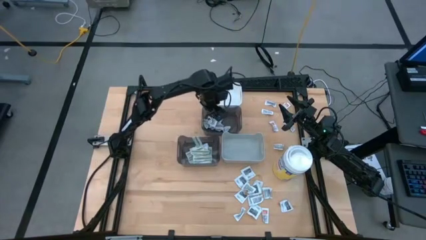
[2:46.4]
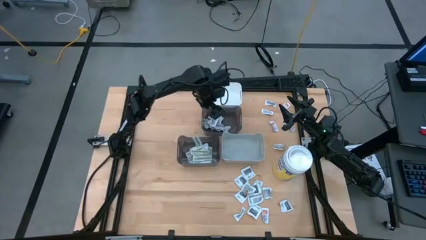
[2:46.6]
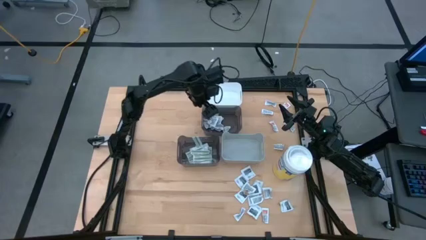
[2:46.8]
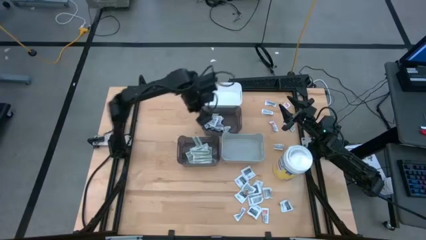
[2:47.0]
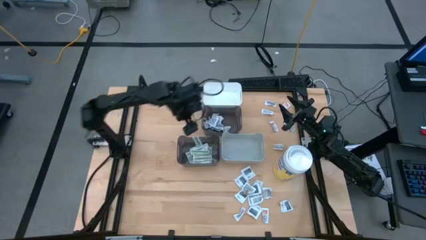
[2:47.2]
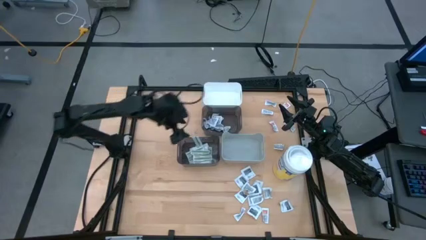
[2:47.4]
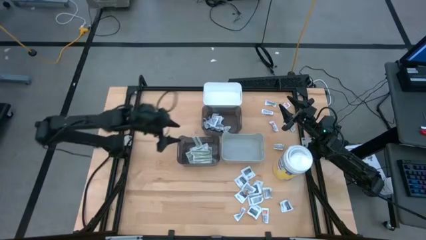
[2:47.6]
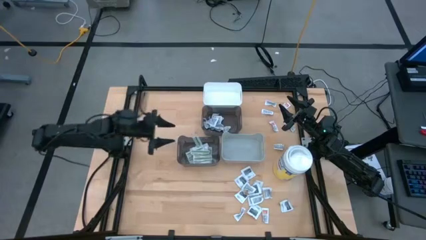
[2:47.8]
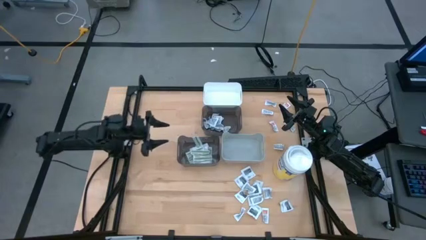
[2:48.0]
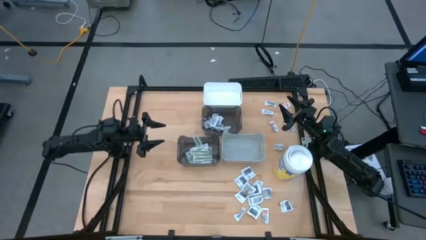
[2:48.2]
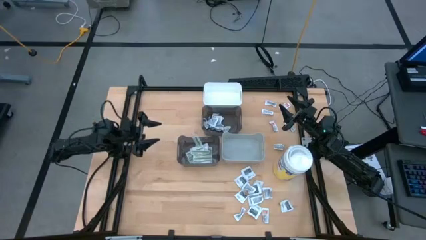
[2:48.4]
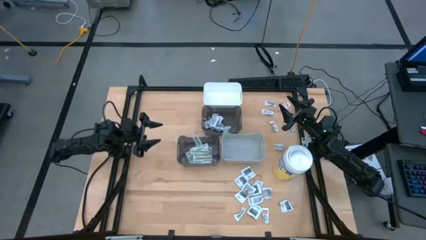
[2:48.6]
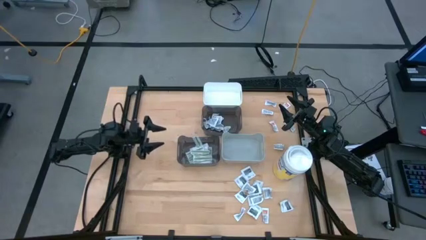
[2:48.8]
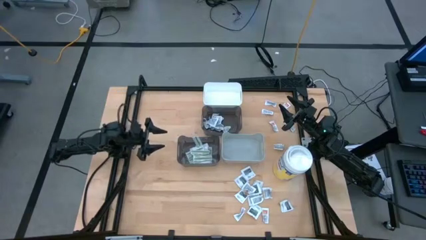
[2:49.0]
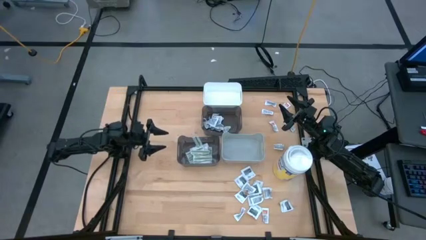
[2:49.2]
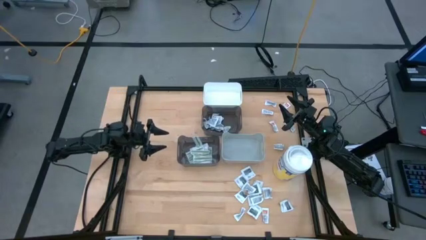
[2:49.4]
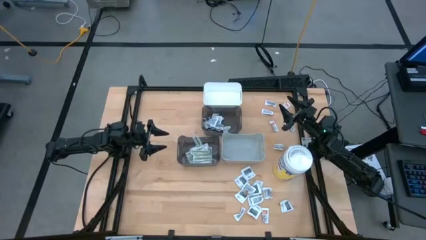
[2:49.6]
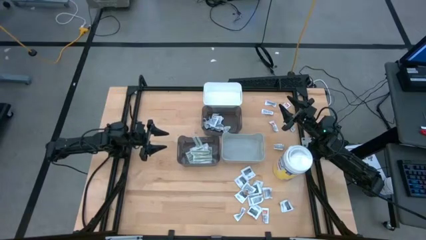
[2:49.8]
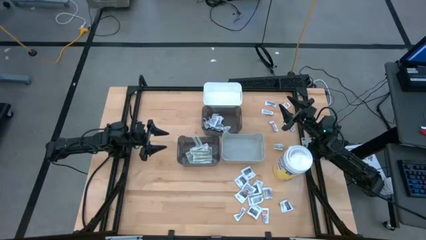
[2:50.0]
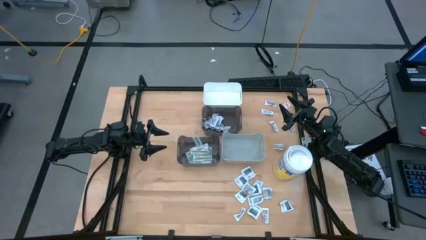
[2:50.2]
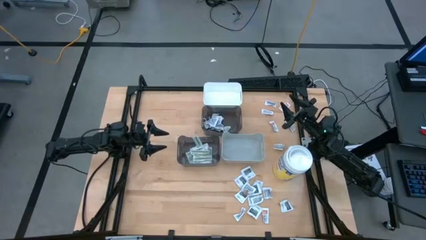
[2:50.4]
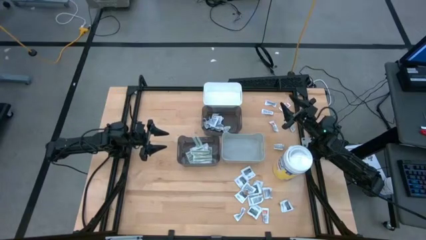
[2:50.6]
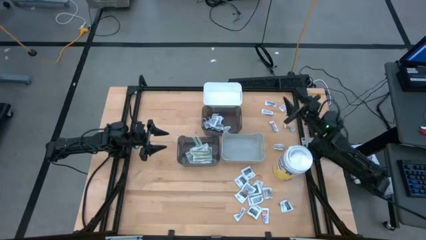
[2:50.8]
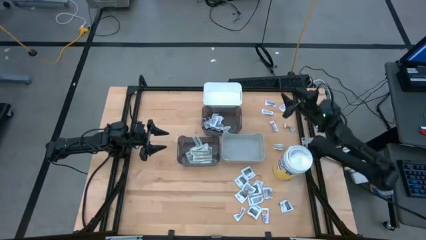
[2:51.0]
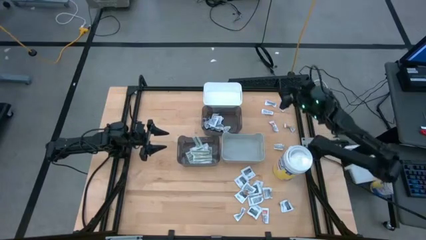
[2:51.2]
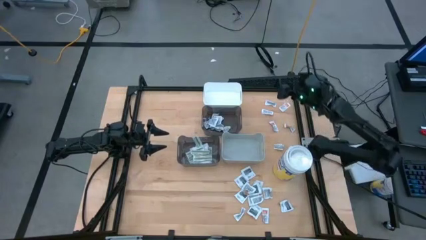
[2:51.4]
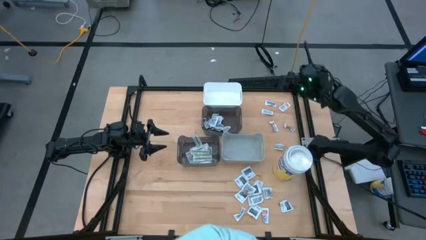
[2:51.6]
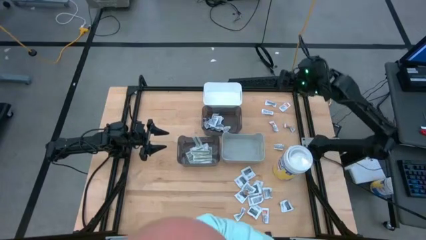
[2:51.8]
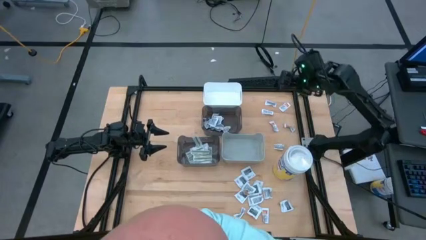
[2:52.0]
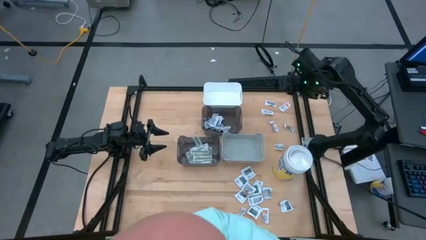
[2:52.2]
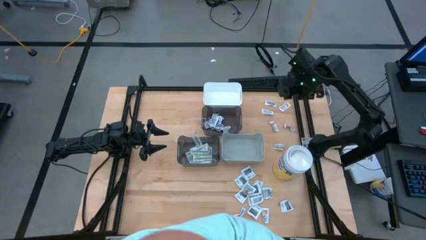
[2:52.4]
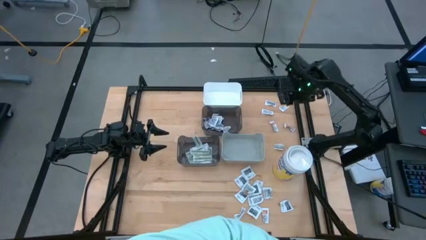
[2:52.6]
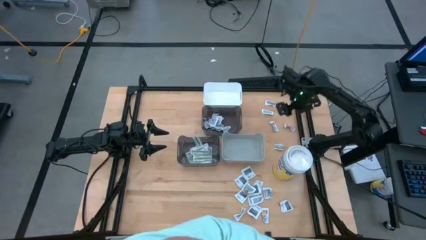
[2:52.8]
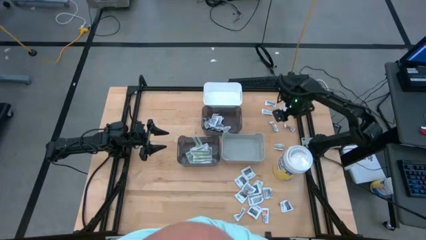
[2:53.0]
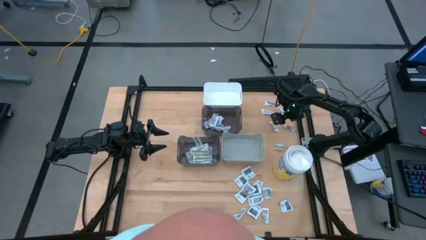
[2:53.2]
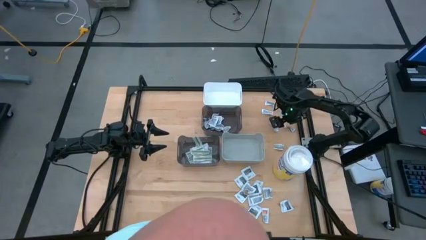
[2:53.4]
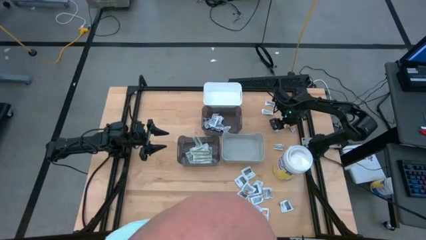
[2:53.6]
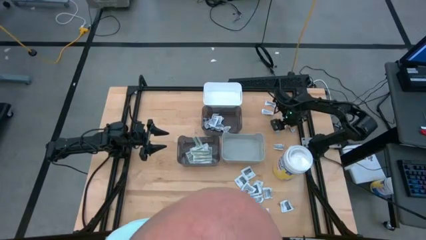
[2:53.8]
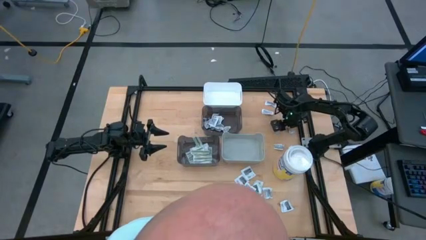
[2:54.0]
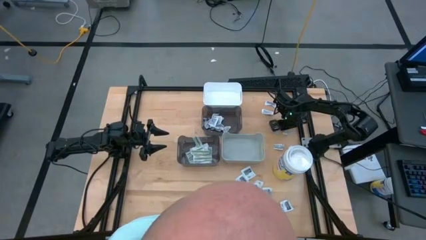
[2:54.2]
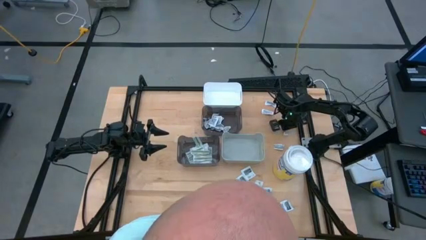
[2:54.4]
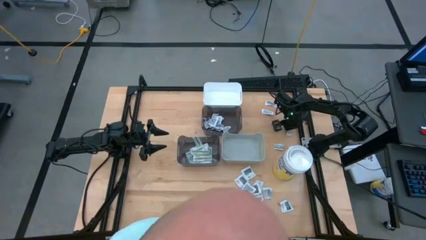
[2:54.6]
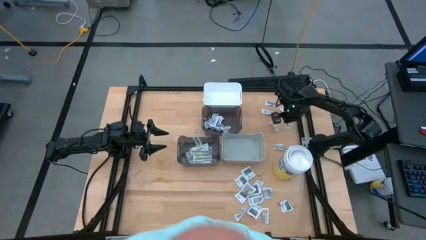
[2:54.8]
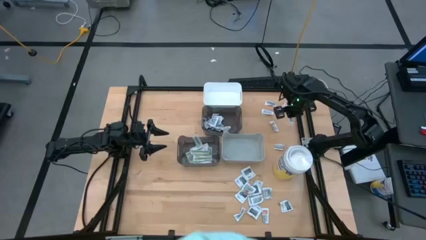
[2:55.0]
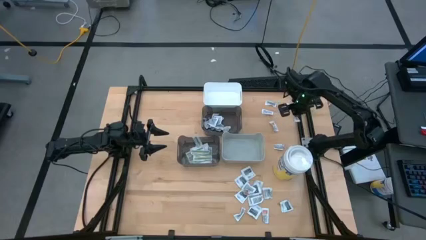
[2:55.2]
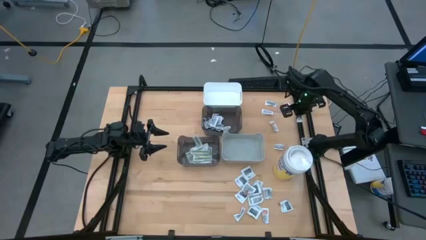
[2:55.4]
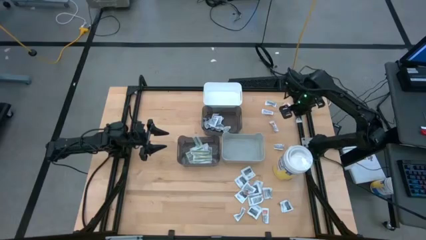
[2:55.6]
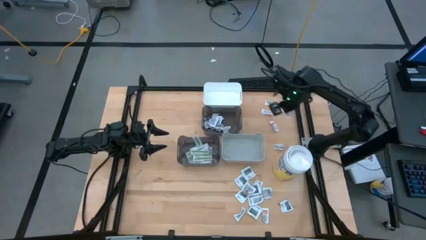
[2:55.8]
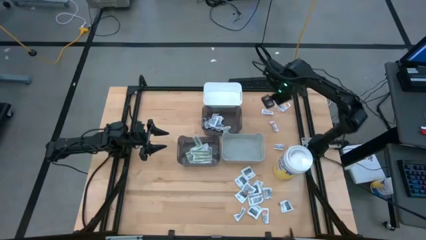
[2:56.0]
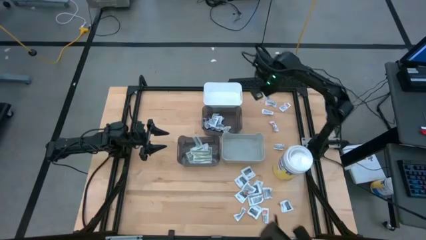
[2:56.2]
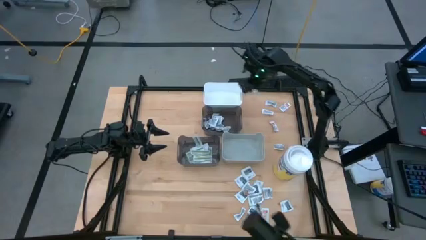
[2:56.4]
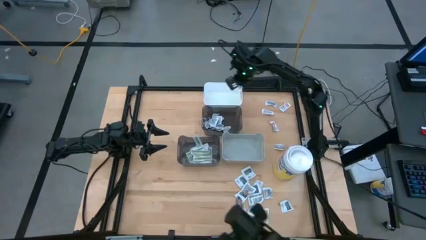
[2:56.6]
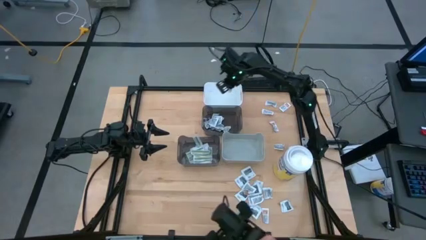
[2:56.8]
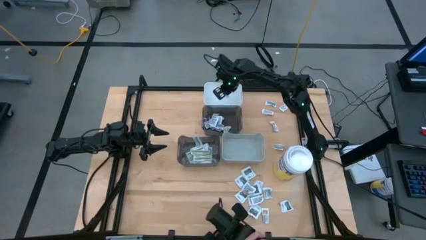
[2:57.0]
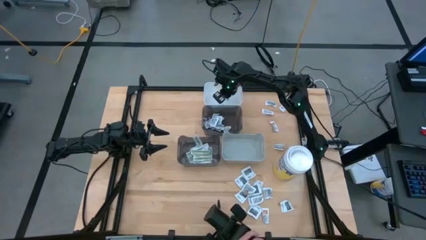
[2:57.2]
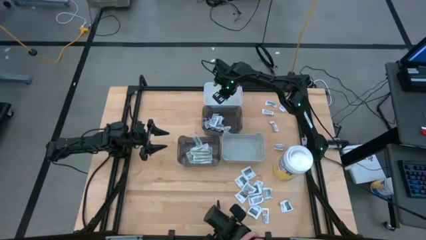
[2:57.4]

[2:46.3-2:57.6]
Task: Pick & Place First Aid Supplies
Put the white ointment pack into the white bin

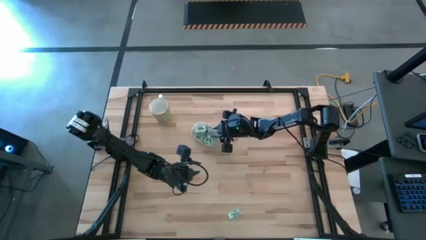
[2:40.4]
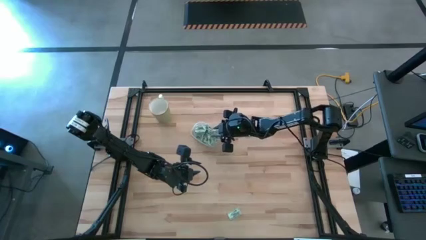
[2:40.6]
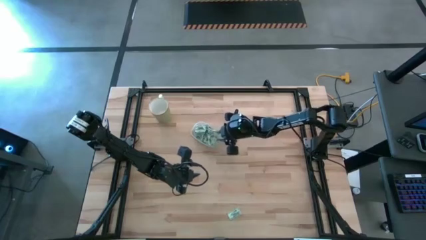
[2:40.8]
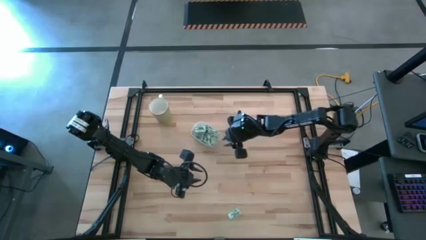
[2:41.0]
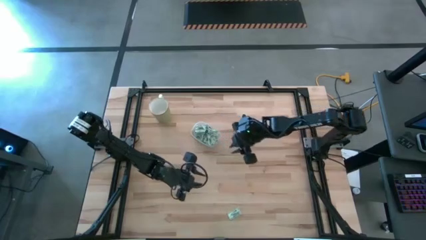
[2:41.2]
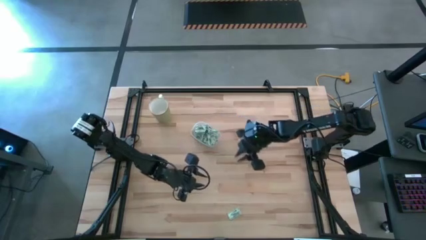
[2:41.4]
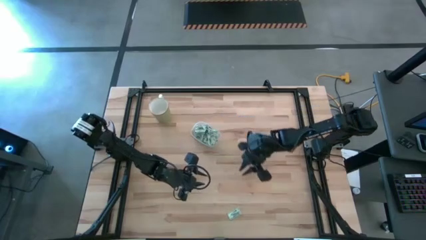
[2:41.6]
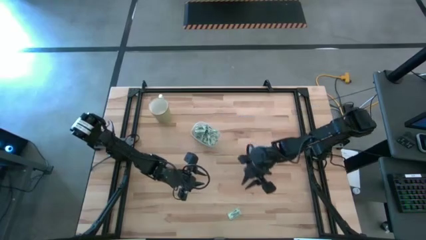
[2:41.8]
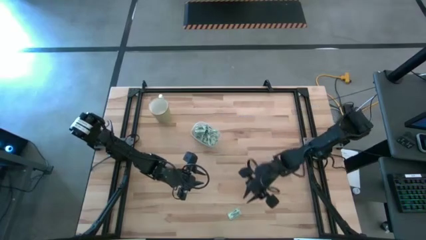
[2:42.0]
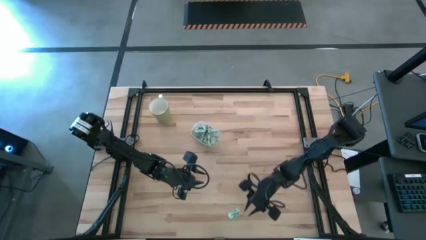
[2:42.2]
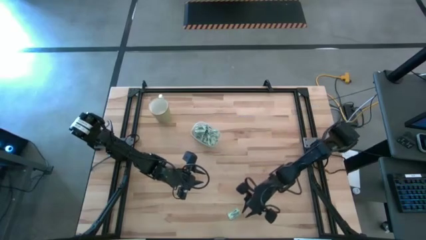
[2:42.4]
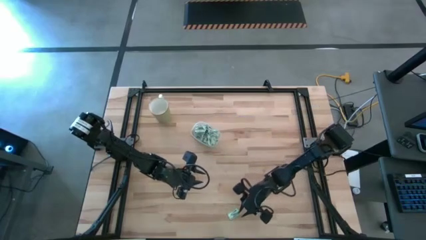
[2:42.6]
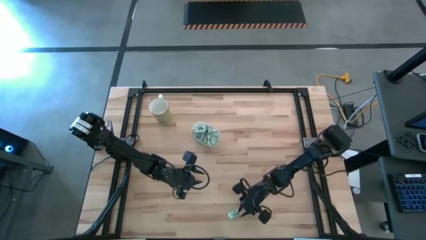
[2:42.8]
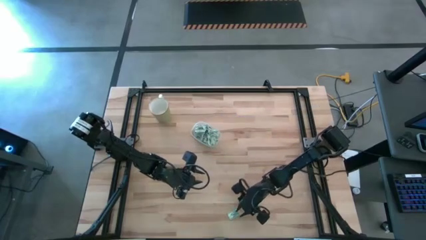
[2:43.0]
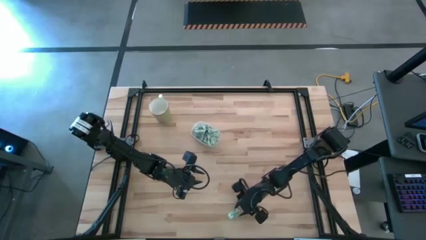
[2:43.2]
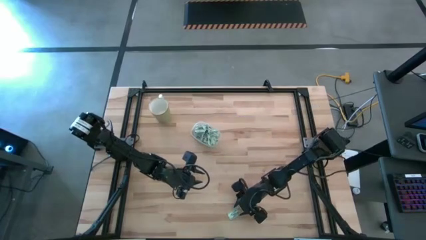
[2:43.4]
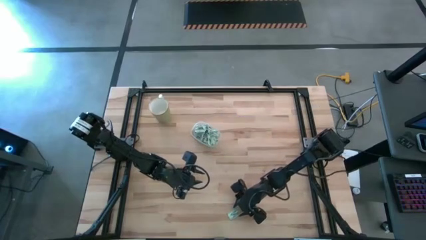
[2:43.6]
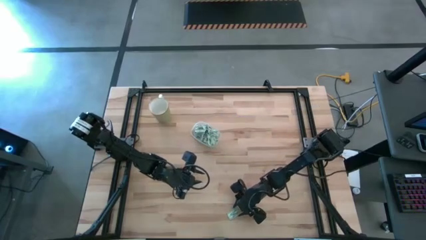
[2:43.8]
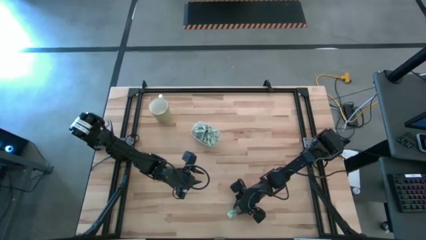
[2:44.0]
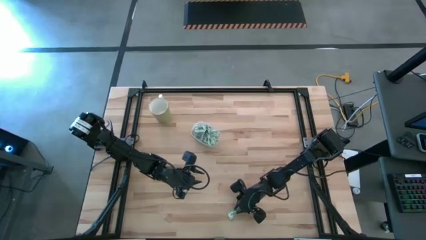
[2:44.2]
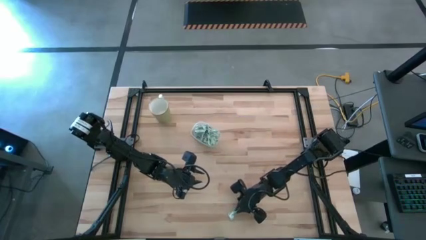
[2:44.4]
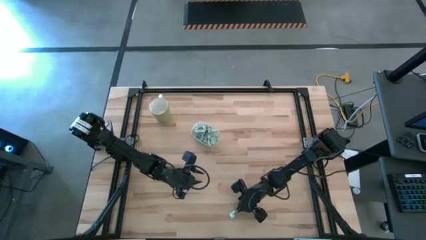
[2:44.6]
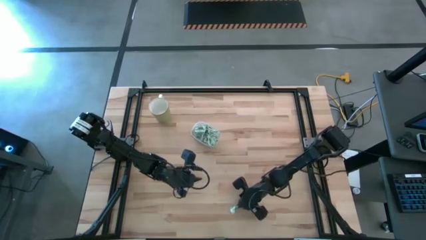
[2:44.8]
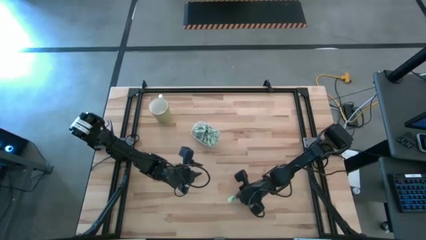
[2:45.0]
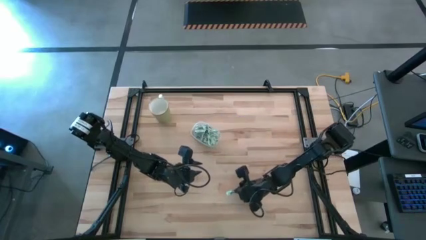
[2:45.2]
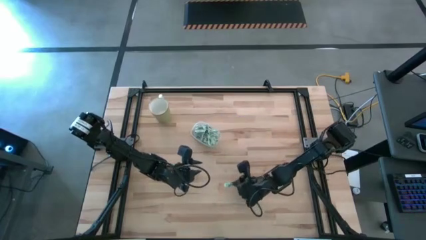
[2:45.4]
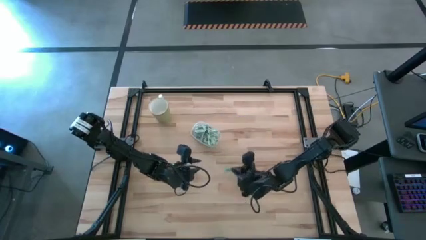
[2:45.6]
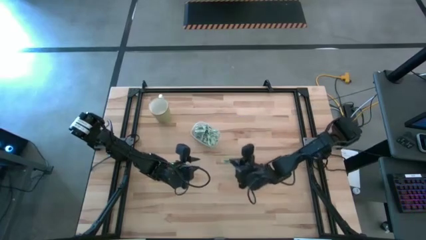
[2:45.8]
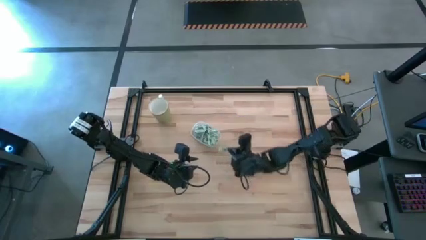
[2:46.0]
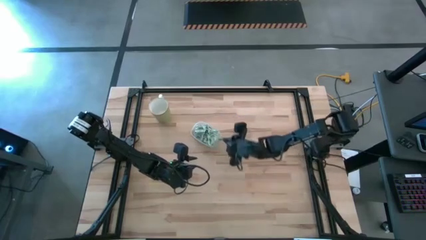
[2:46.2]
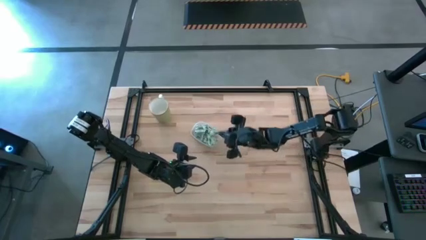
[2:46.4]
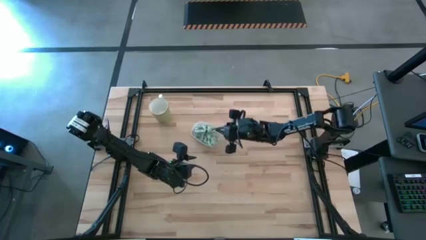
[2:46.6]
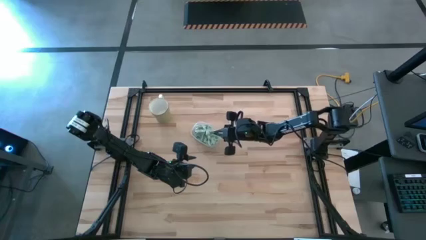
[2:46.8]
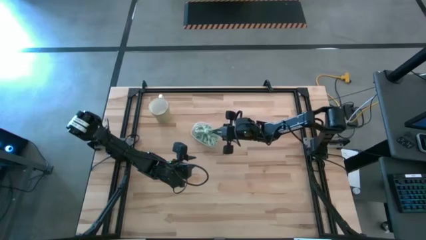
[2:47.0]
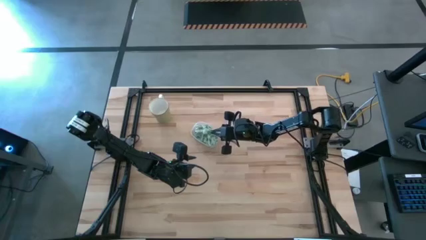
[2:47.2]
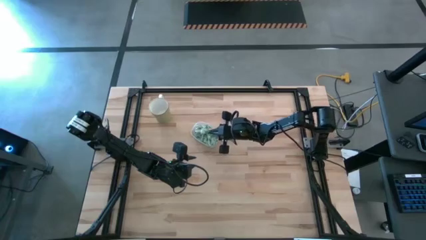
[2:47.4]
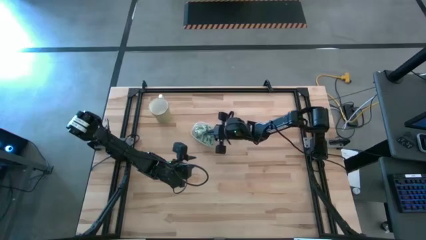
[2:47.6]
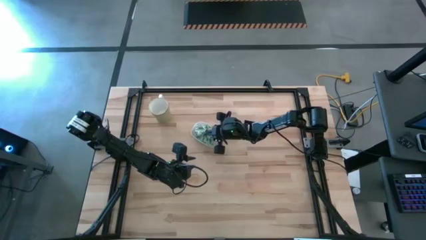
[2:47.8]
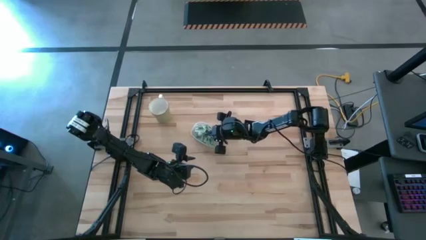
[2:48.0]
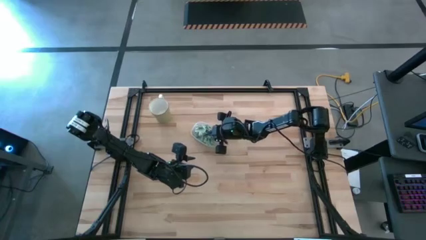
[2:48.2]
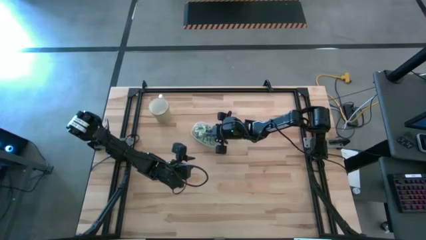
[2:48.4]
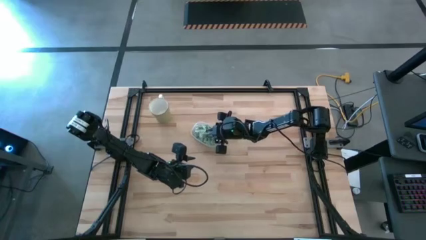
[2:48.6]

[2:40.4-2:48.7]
Task: Pick and place Stevia / Truvia into bins
Put the stevia packet into the transparent container
